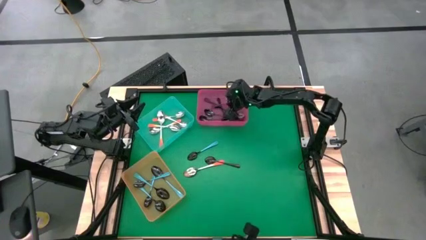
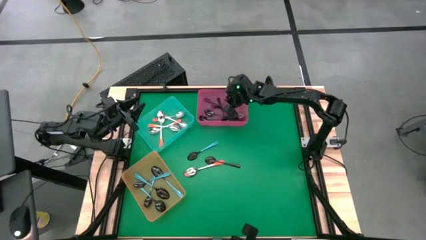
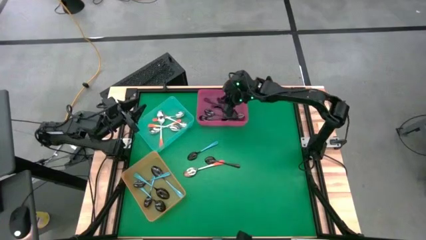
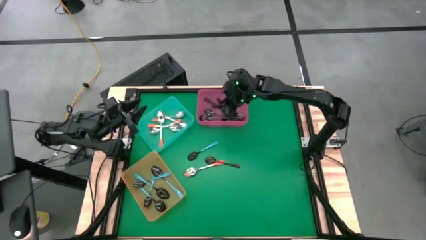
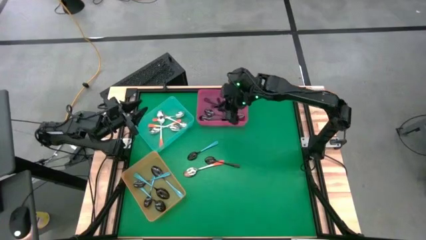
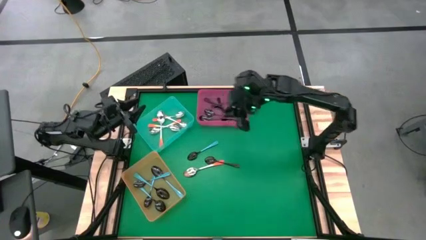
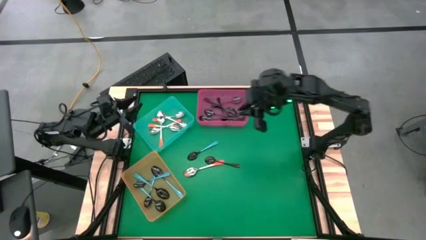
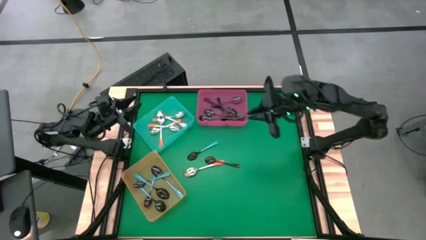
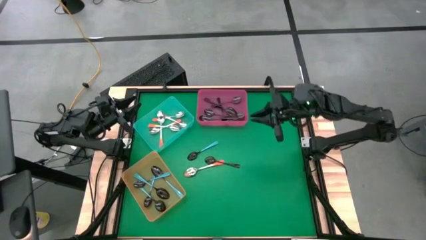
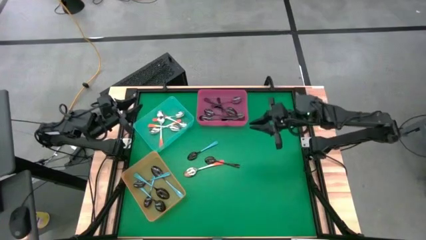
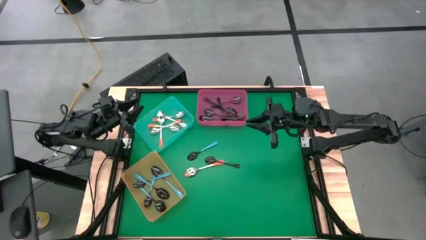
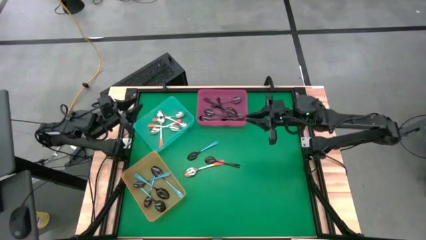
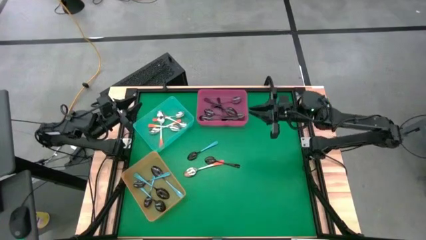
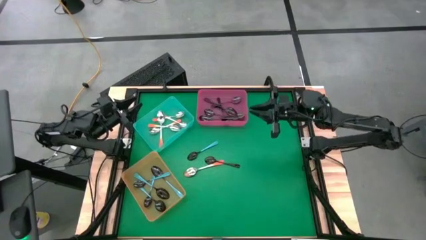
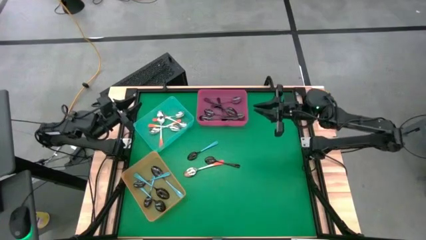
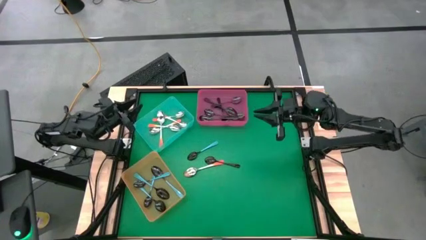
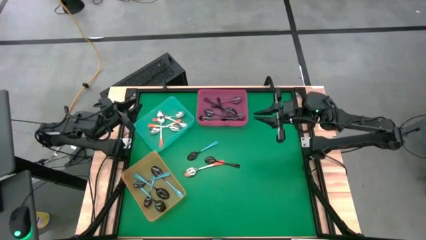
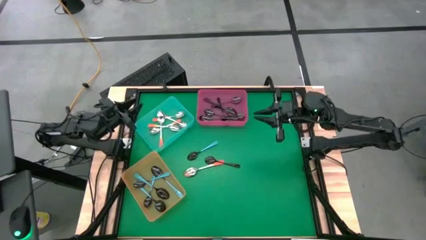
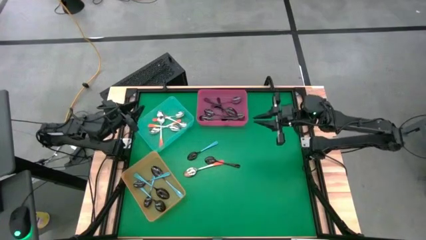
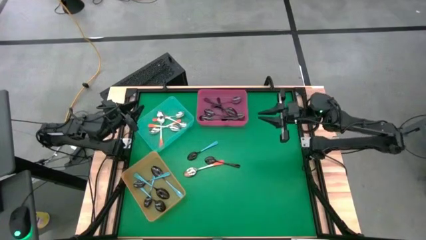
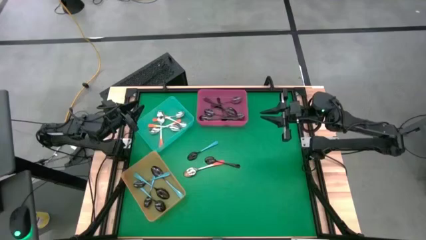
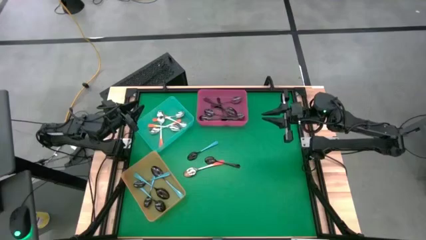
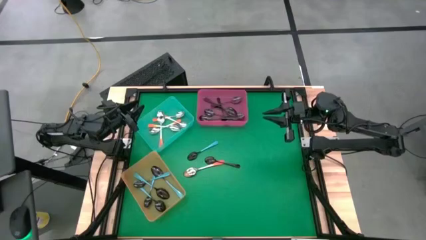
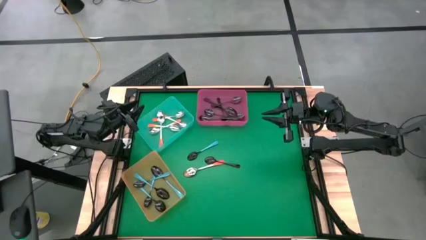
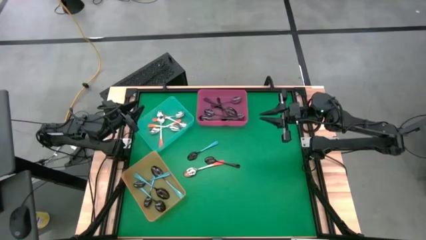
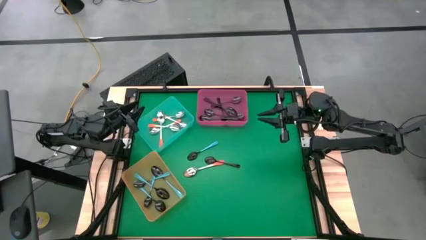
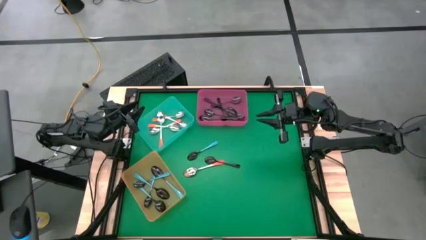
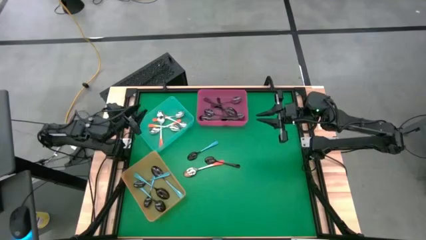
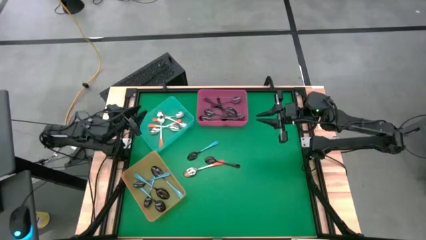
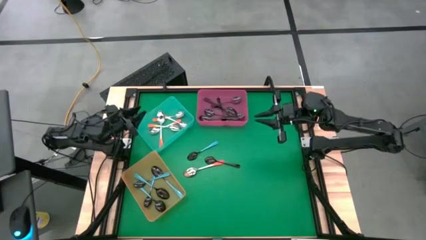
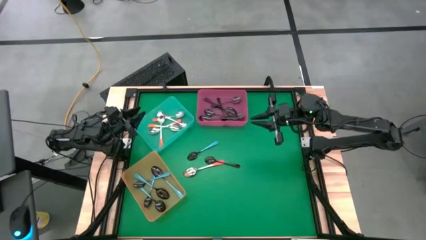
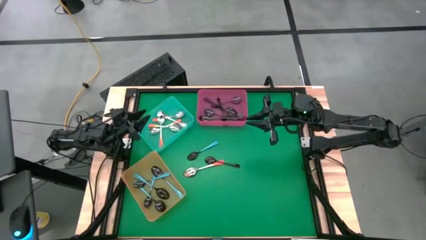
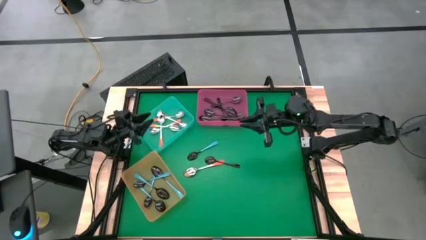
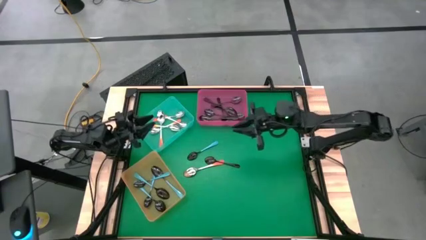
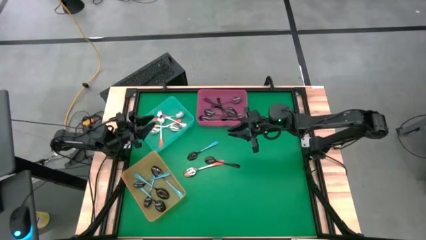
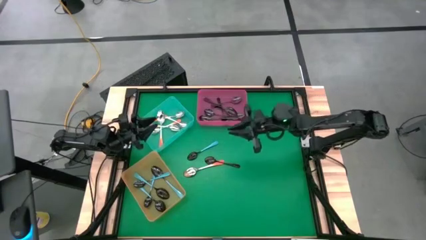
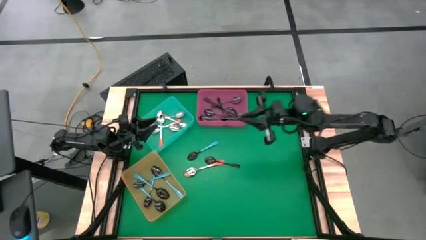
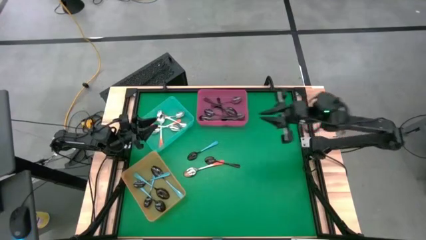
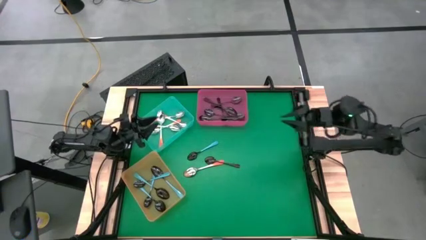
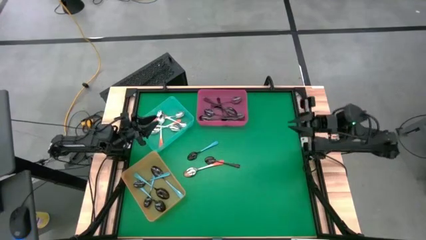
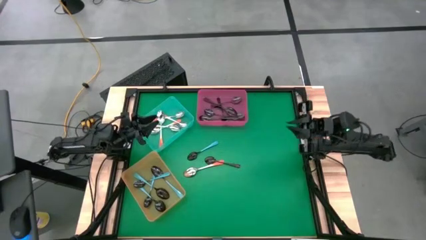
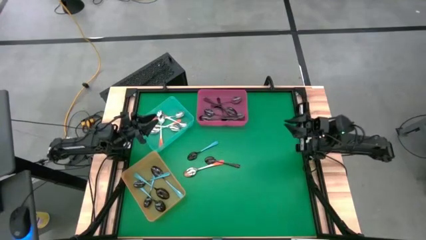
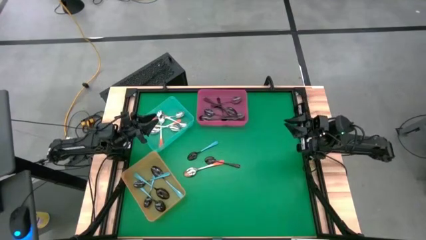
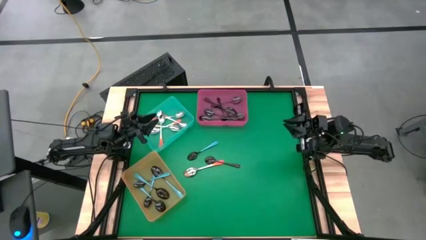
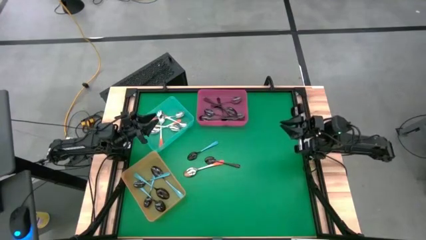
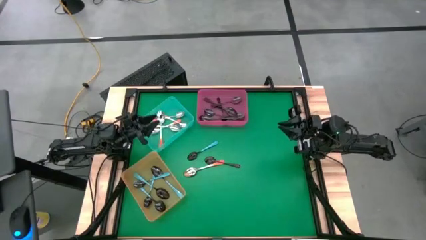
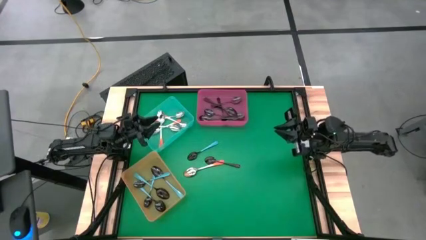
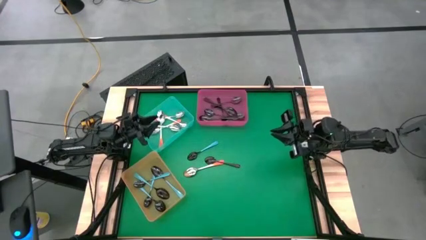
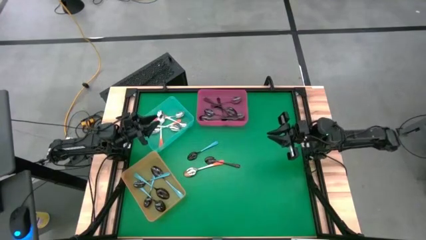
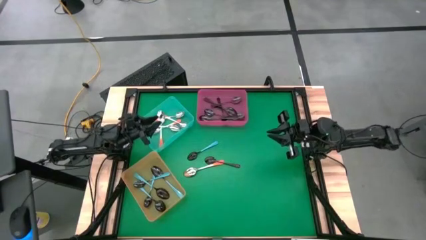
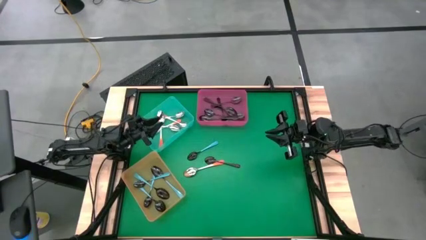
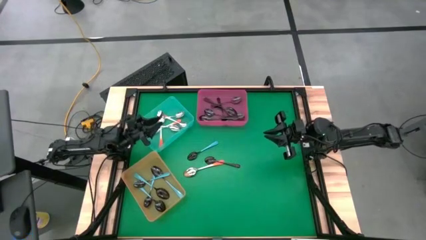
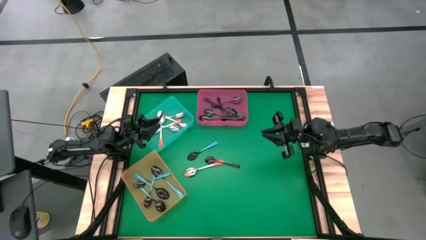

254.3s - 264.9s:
Task: Sort silverware by color (type)
Put the orange spoon into the blue bin

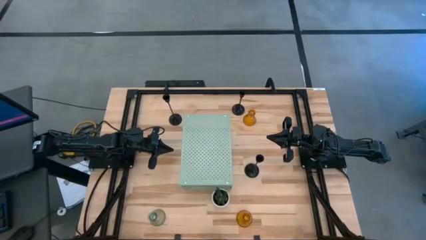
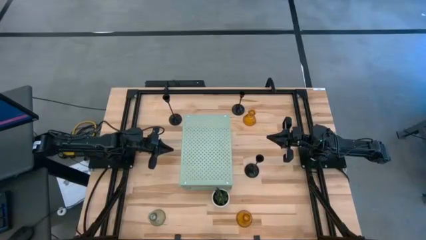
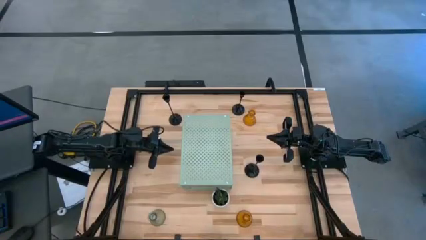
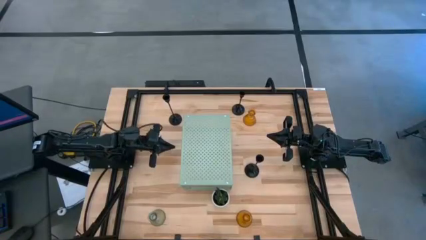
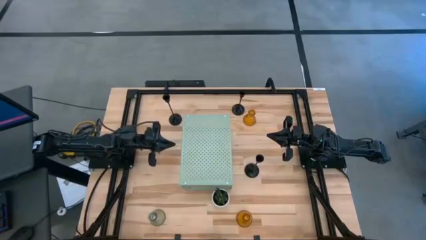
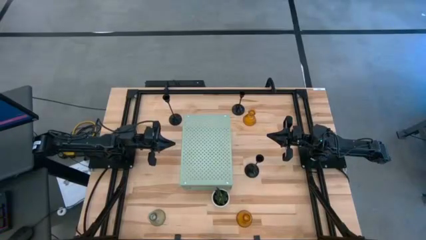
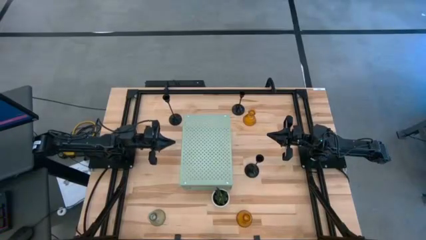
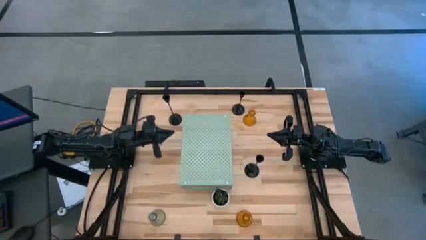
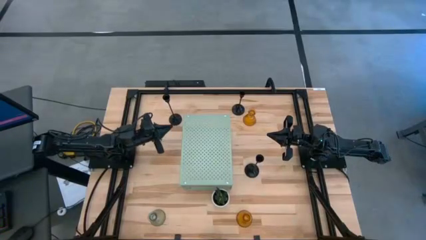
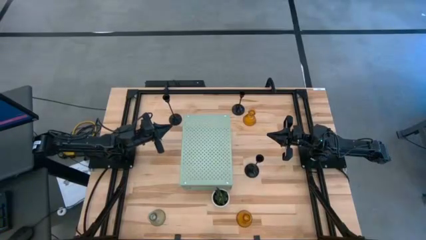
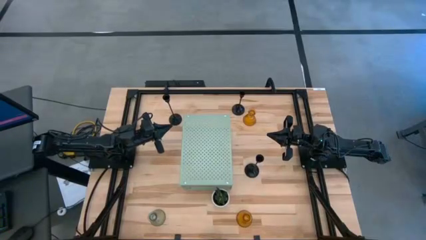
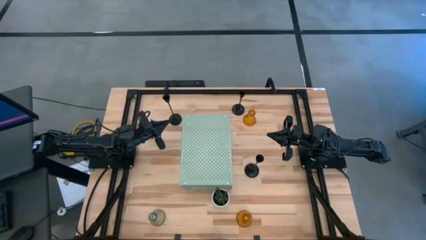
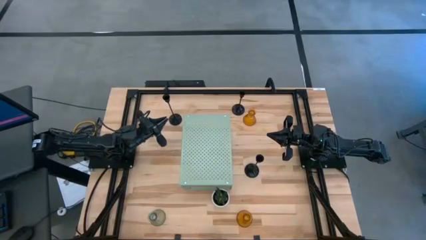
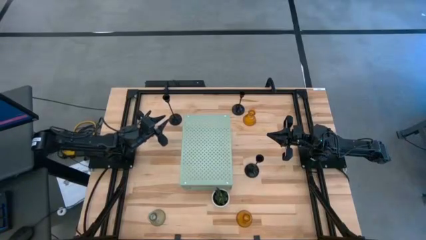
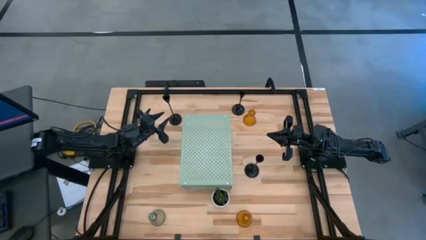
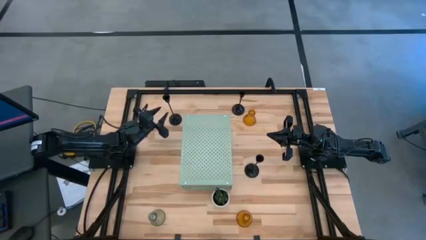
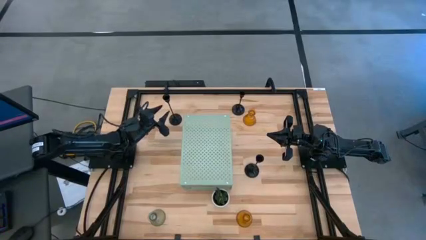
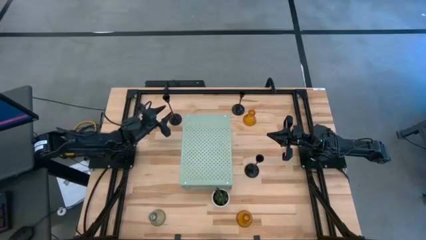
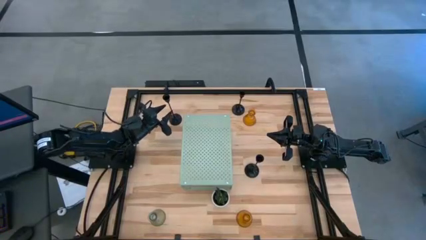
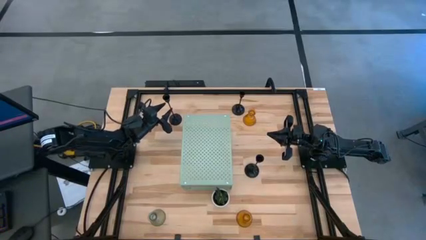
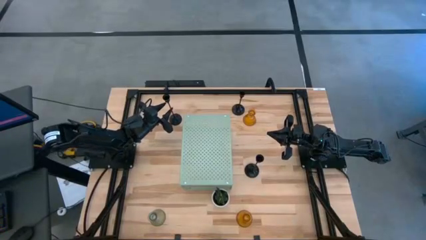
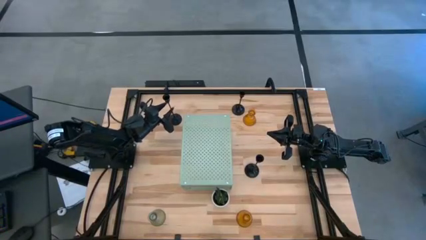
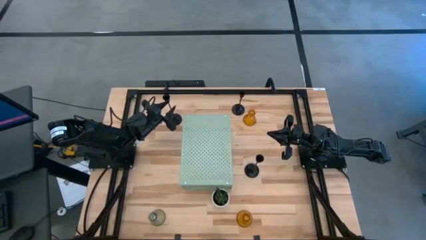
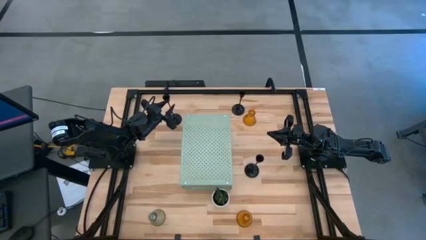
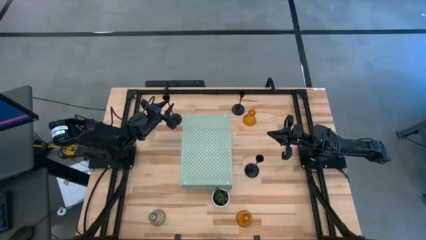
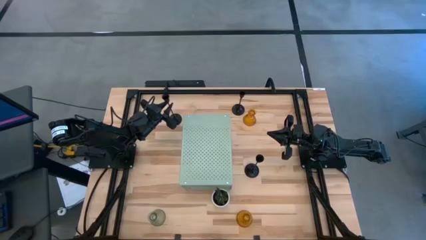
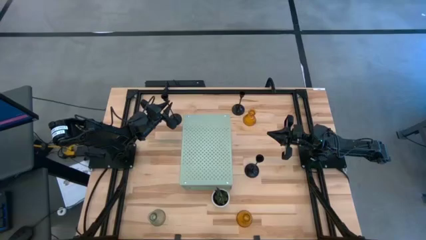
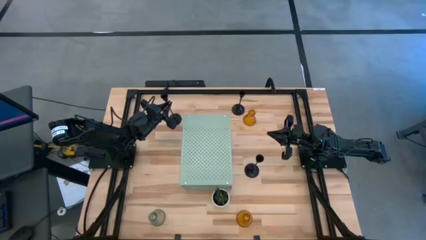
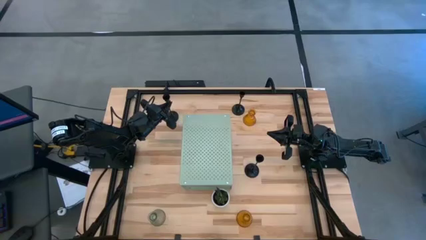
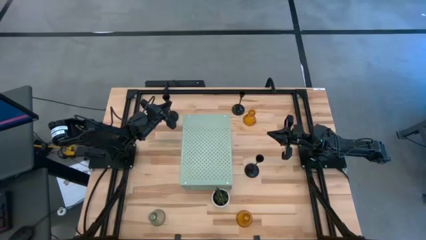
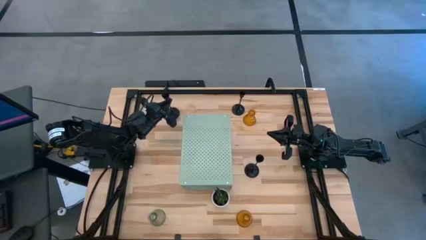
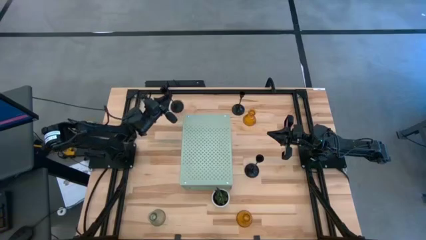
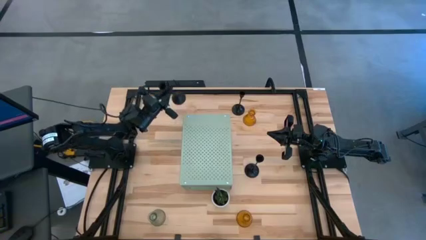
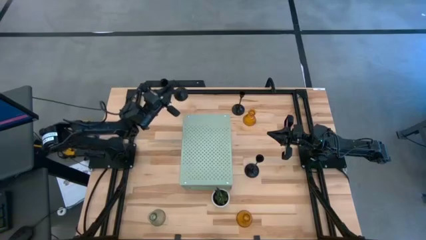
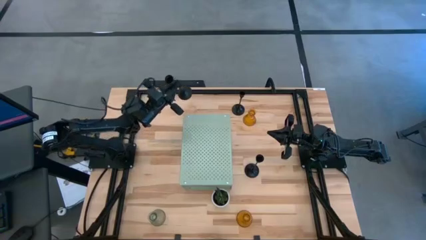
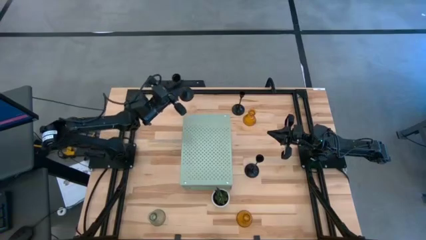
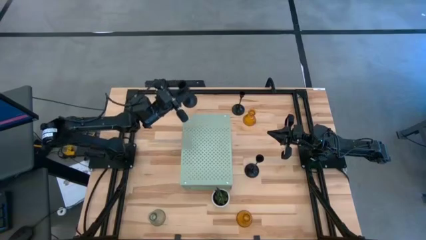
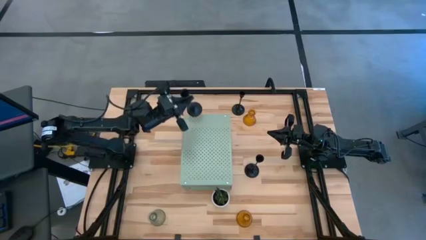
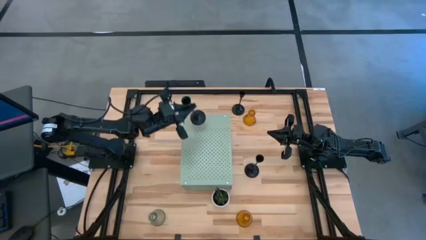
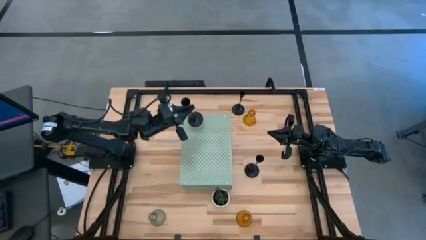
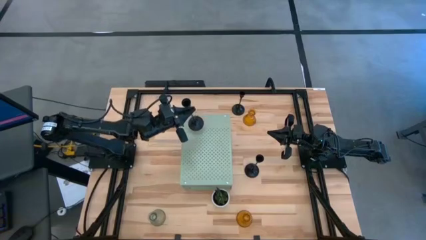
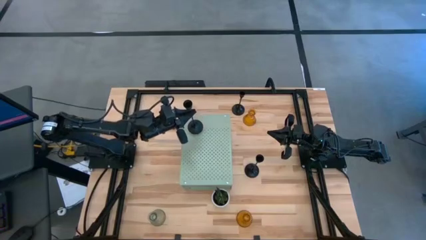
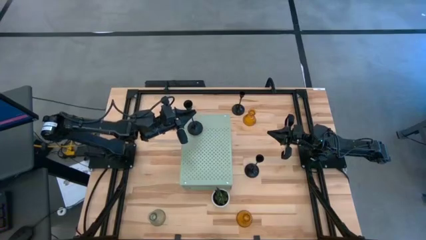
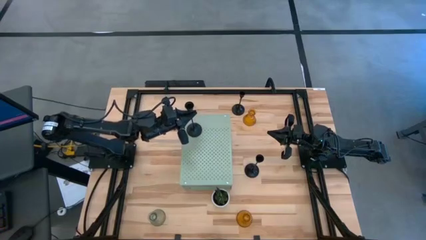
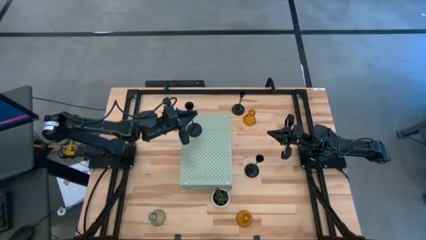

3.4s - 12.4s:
Task: Pick & Place candle stick holders
Put the left black candle holder on the shelf
